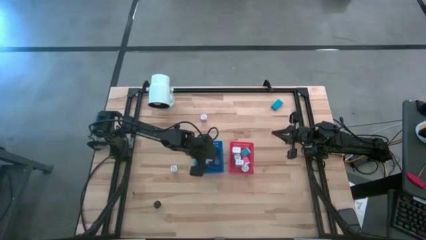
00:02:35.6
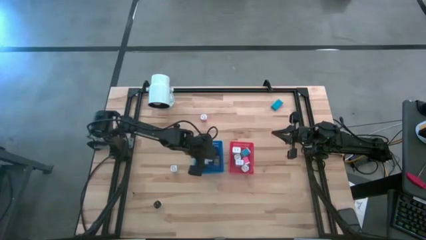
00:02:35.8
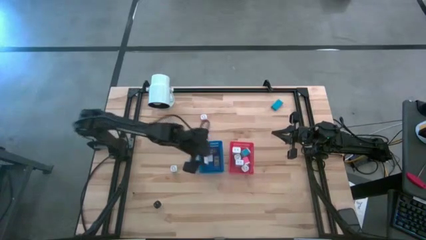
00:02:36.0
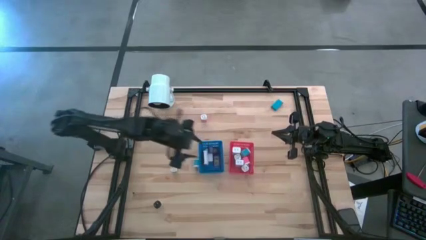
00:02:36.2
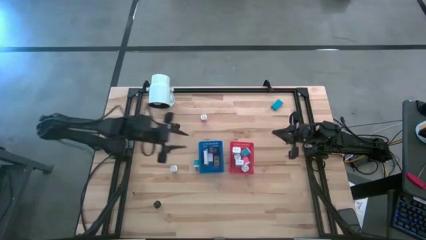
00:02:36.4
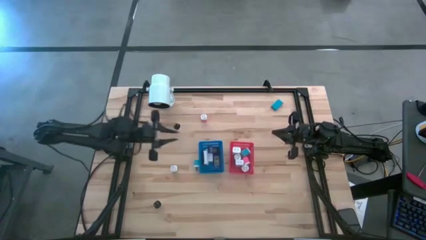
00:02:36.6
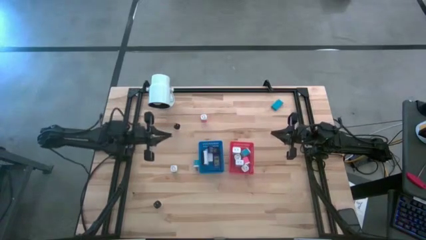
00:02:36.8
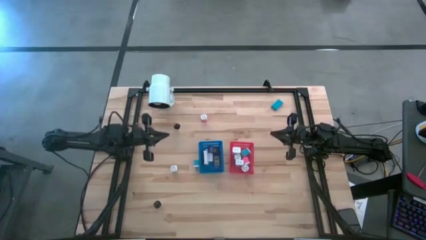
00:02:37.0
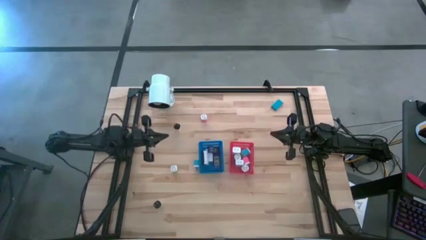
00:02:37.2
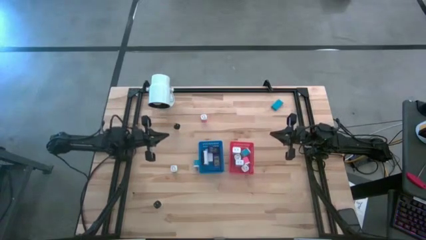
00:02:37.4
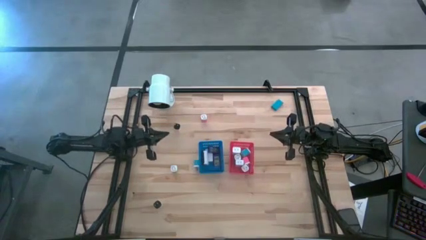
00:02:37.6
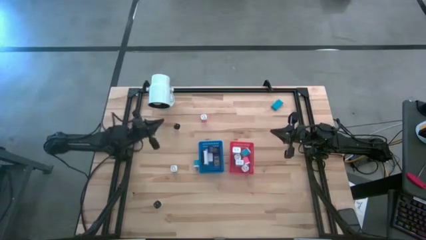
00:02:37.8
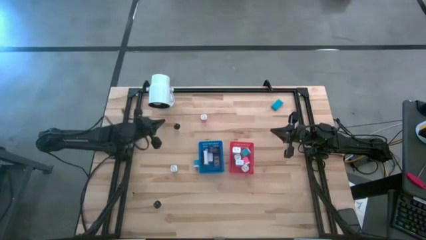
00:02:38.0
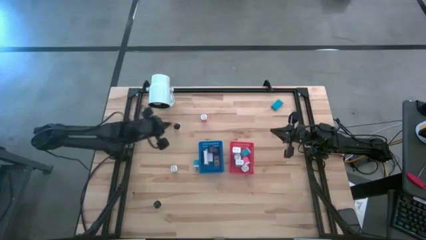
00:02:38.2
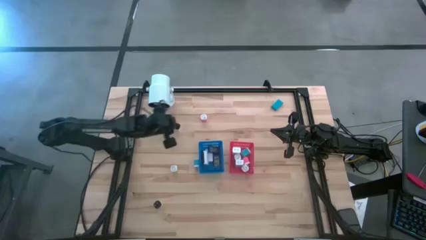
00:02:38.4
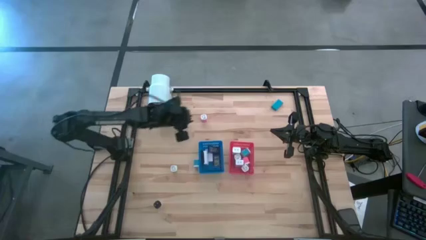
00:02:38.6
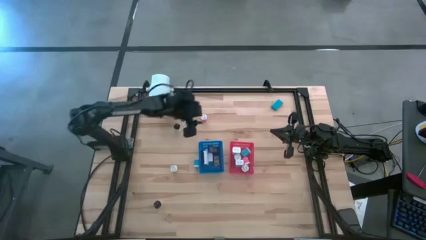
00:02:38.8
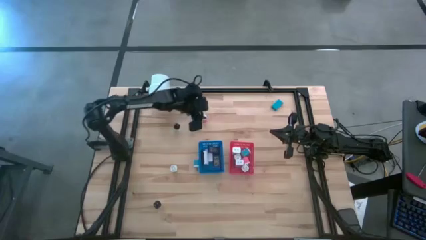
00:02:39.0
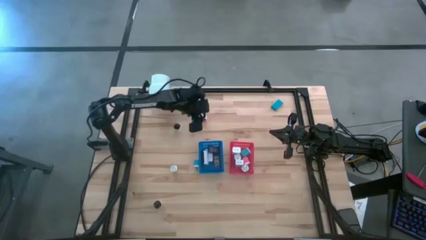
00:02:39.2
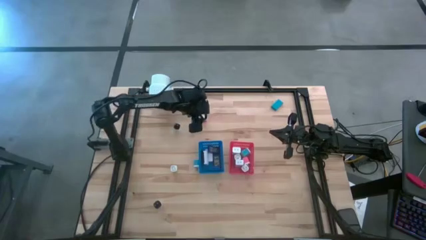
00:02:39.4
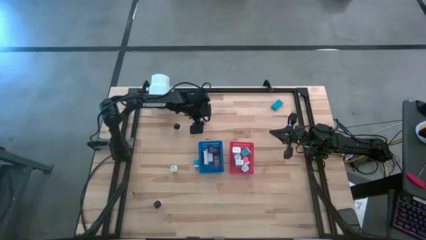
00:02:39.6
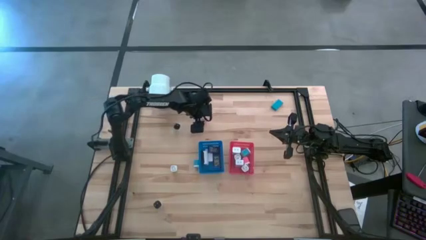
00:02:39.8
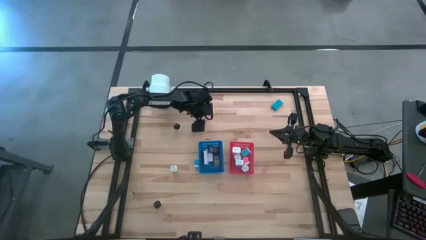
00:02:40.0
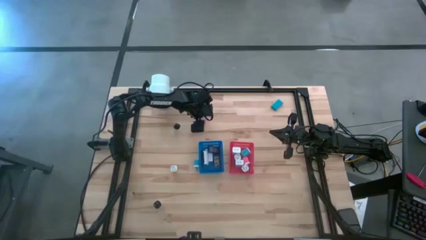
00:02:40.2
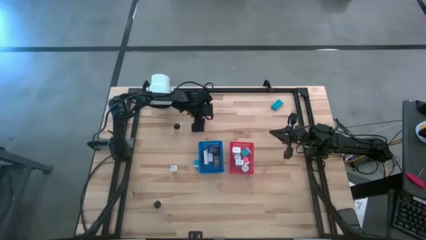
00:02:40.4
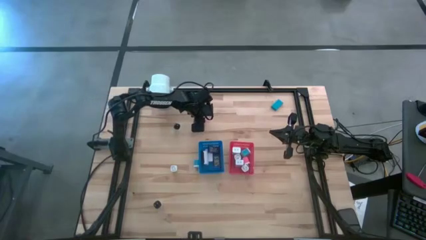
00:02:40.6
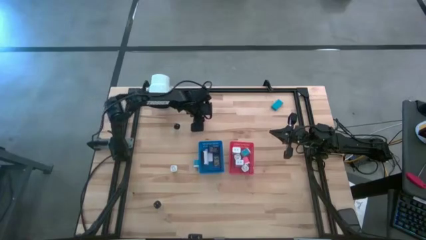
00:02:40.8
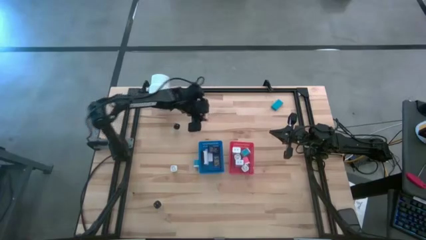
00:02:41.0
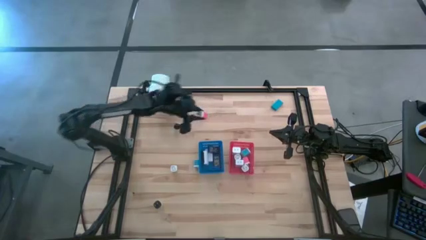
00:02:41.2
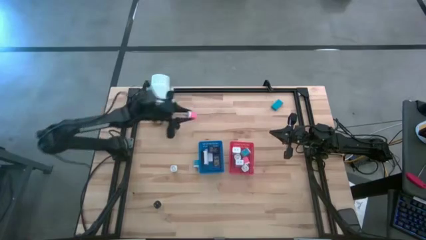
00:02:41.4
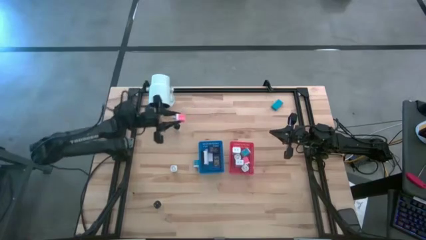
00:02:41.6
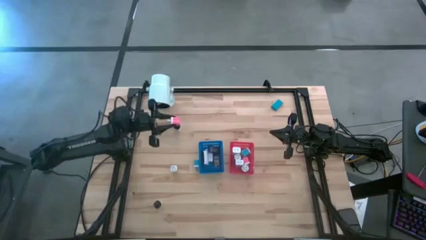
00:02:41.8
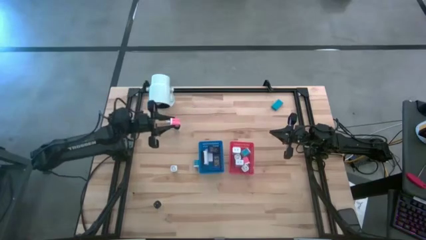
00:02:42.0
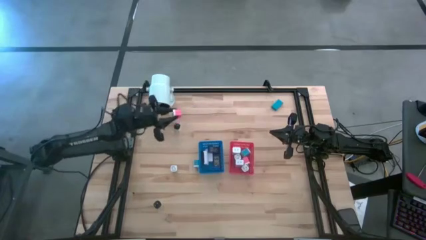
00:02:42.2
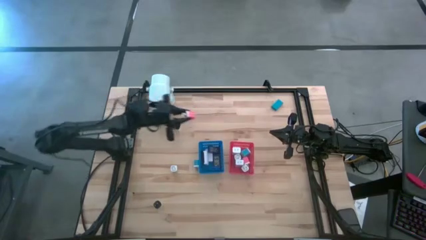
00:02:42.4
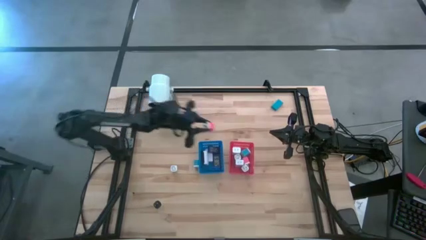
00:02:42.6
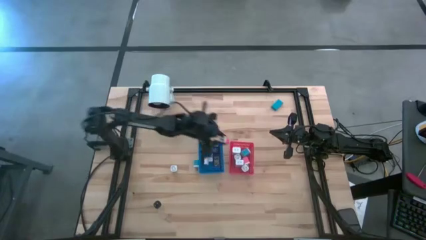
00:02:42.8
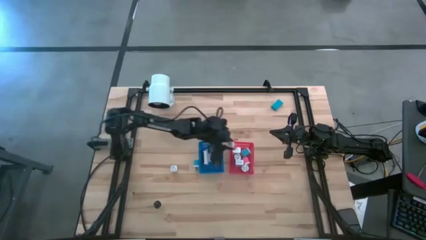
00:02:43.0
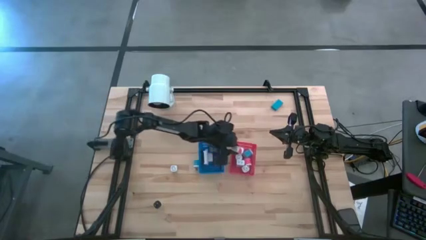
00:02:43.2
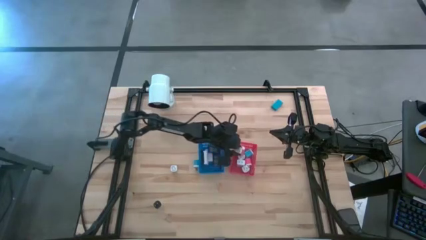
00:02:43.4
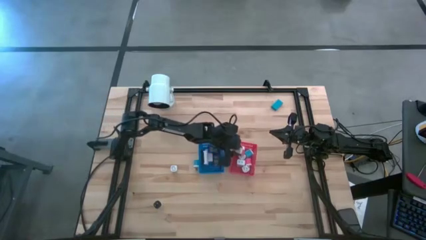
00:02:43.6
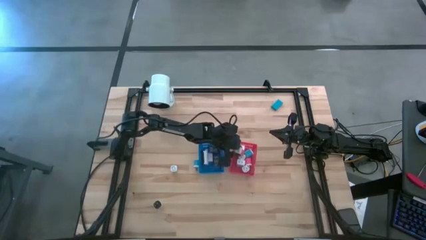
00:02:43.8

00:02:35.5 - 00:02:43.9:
Task: Sort adapters and digital timers
Put the top pink charger adaptor into the red bin

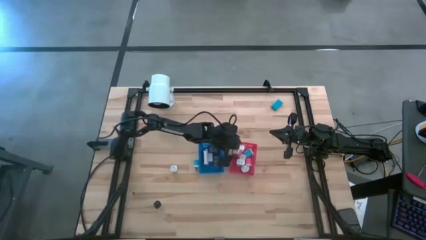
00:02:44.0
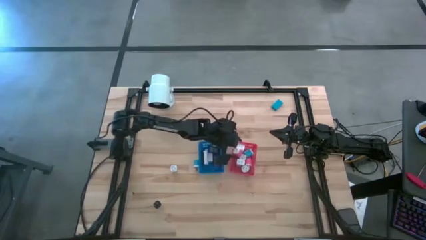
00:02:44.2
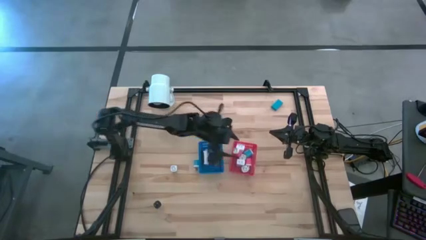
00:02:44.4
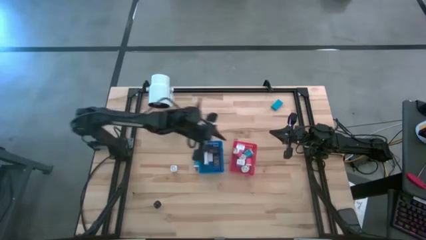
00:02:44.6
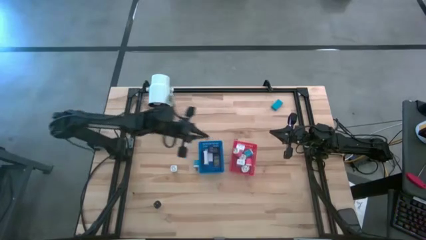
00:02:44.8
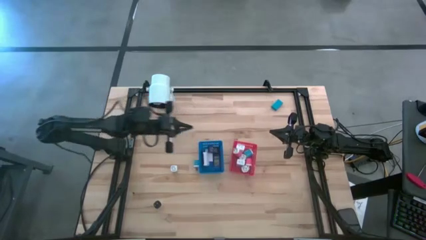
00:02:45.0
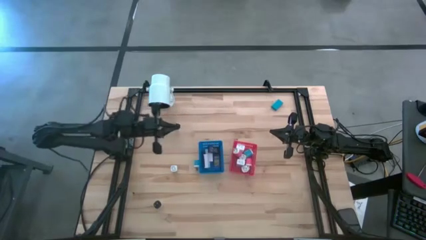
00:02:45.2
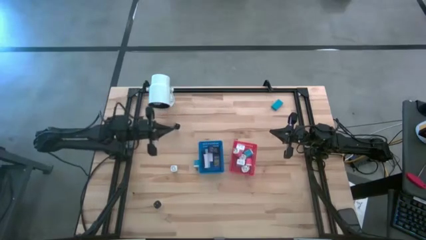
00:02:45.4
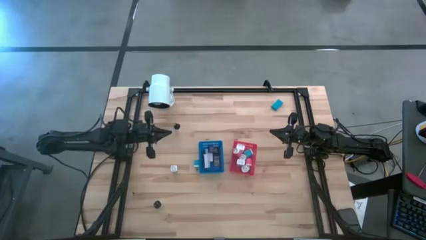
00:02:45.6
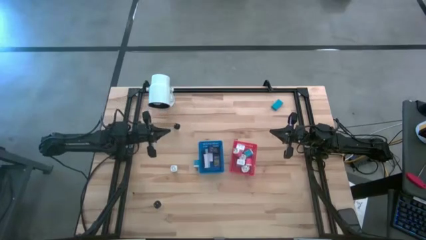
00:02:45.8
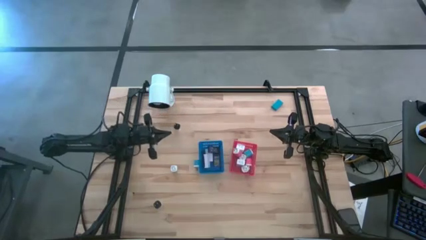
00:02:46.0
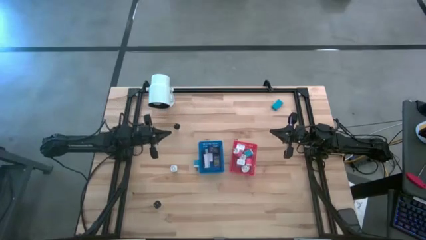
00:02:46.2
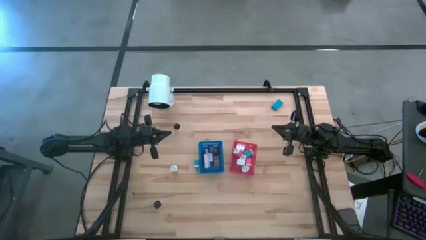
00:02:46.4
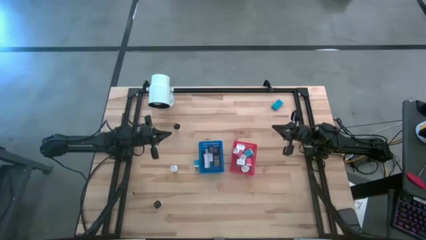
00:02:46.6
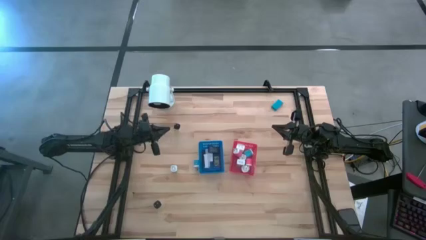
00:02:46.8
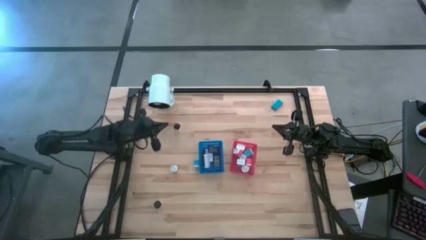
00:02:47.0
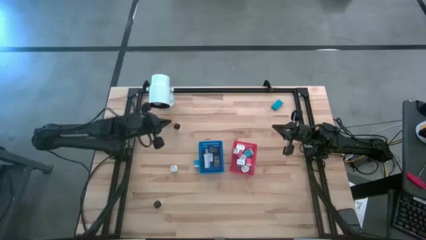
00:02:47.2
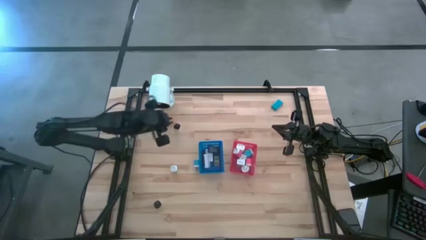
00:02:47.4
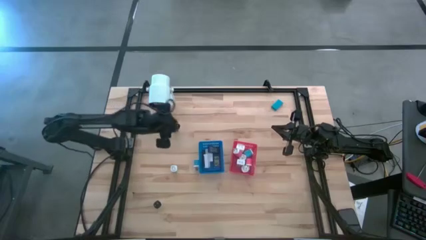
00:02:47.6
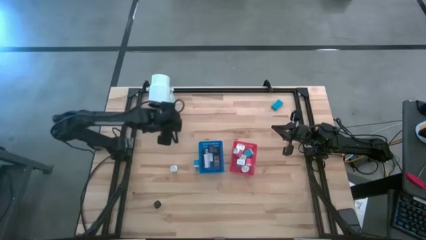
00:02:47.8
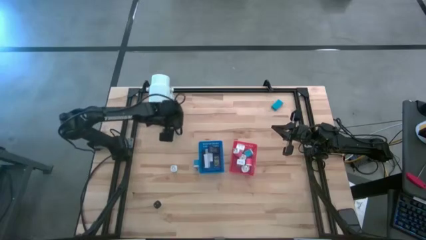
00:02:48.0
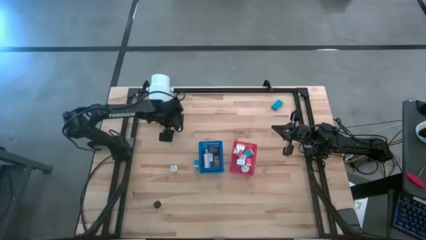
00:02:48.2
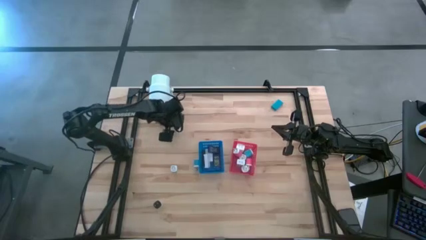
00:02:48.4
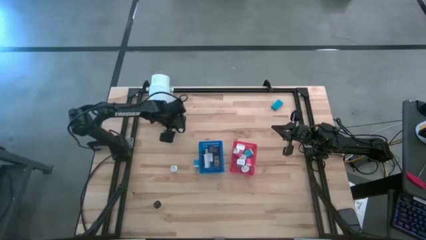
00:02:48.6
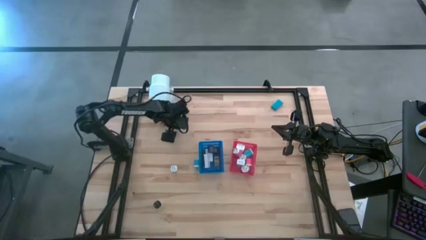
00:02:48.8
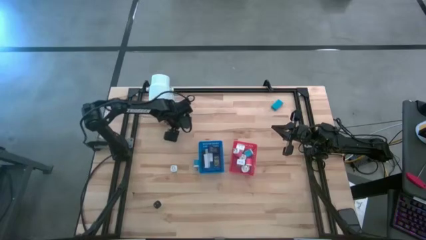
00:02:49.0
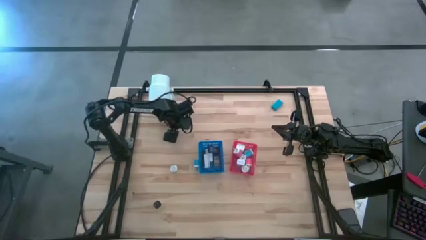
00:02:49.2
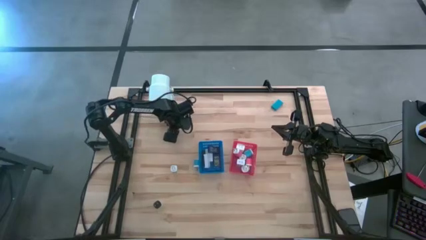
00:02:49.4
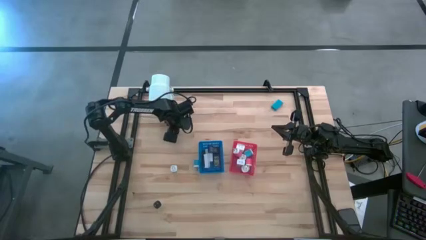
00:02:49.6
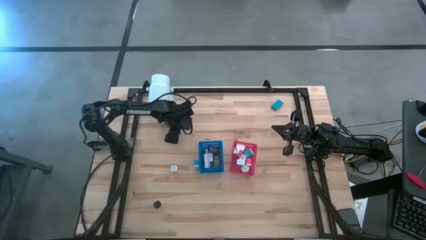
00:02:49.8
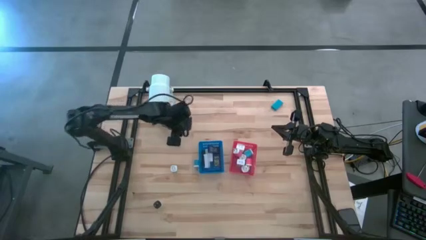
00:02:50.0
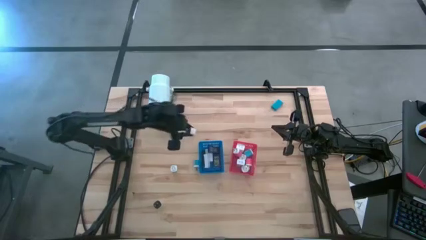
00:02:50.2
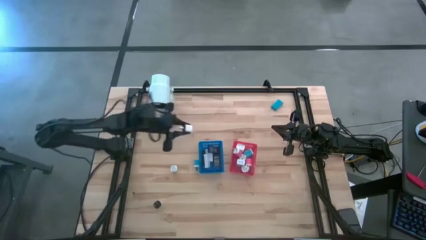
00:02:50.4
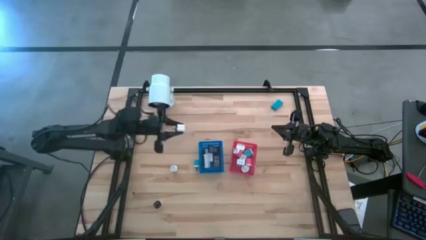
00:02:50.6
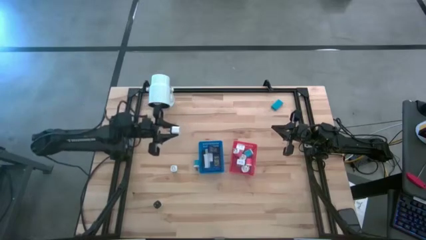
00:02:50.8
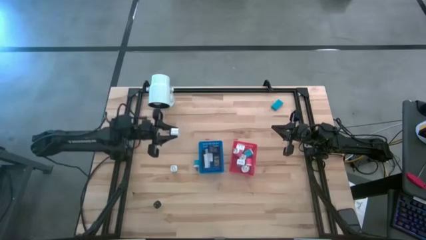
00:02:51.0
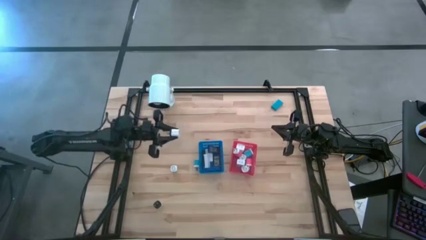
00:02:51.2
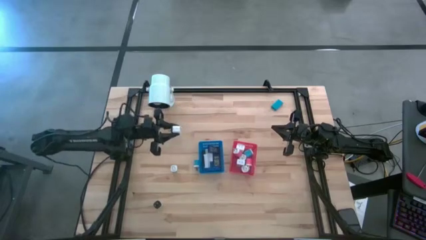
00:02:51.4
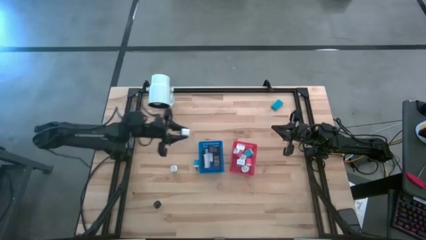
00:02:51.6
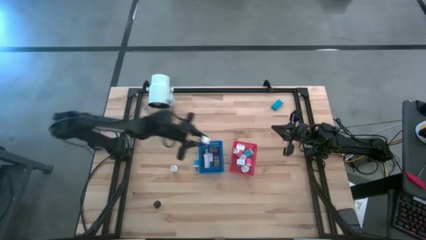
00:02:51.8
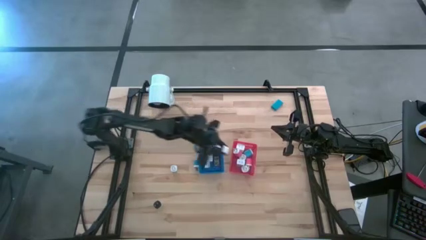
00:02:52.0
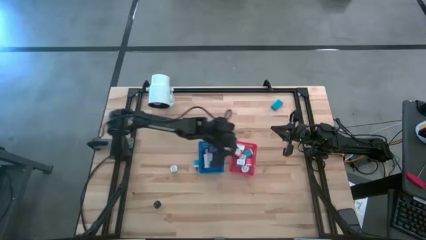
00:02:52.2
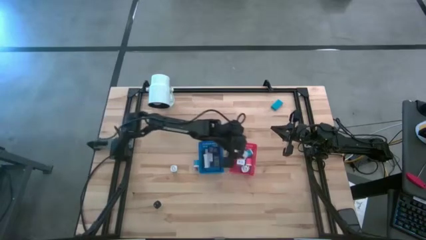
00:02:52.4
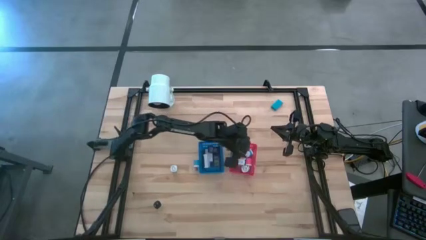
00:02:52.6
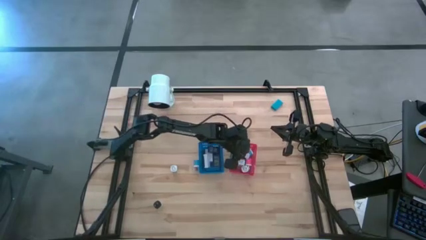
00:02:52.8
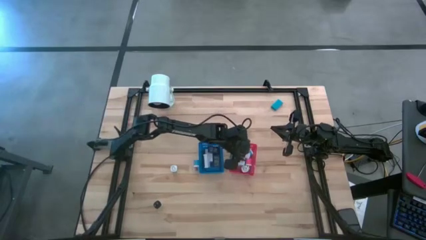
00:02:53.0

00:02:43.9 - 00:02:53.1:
Put the top white charger adaptor into the red bin
